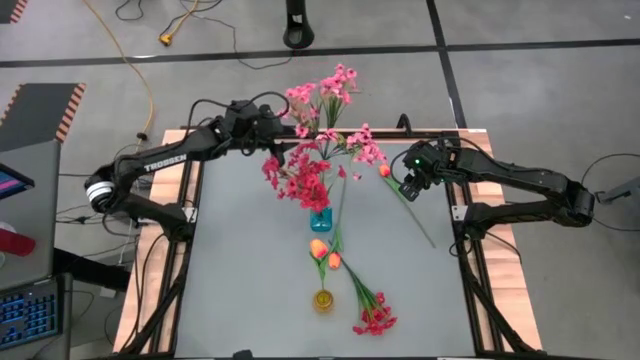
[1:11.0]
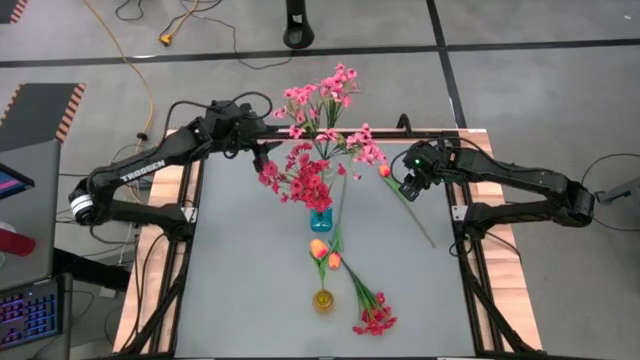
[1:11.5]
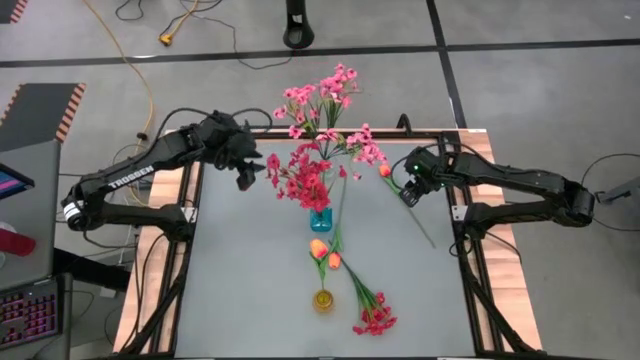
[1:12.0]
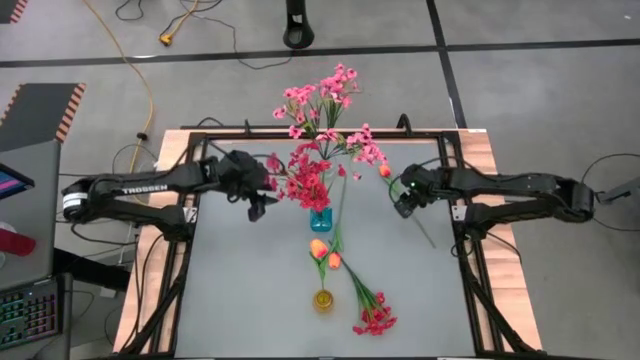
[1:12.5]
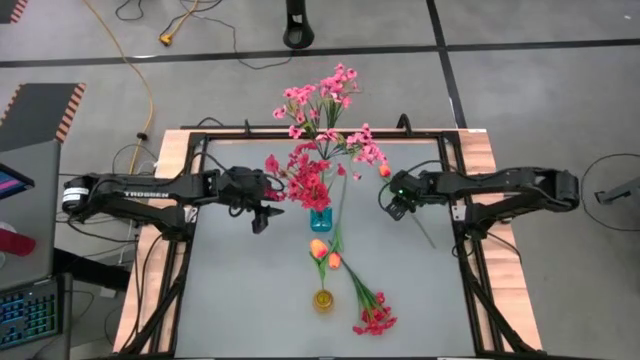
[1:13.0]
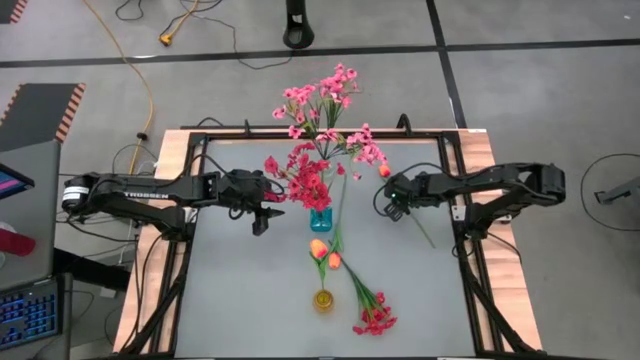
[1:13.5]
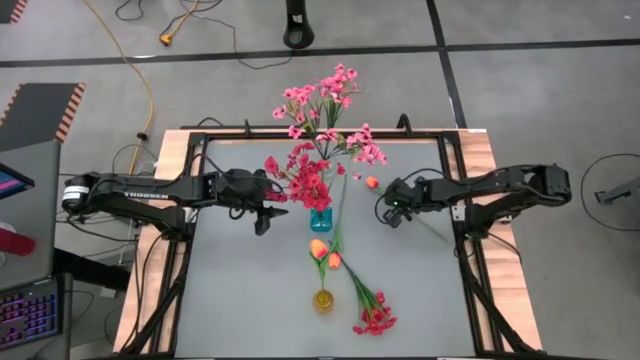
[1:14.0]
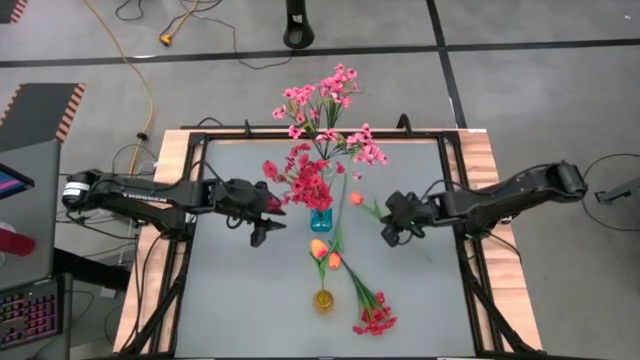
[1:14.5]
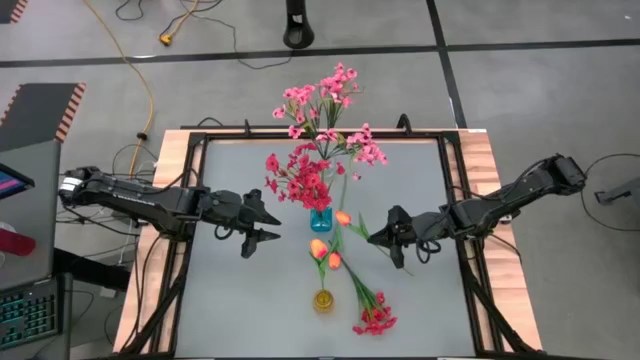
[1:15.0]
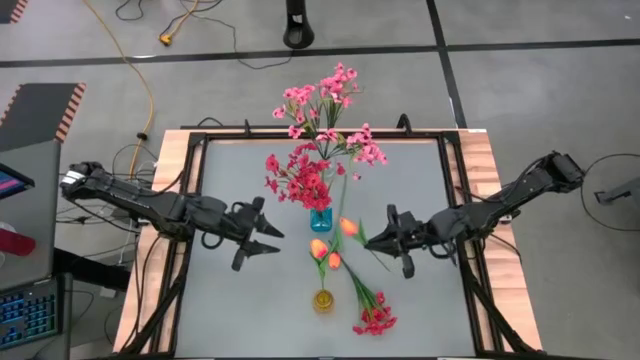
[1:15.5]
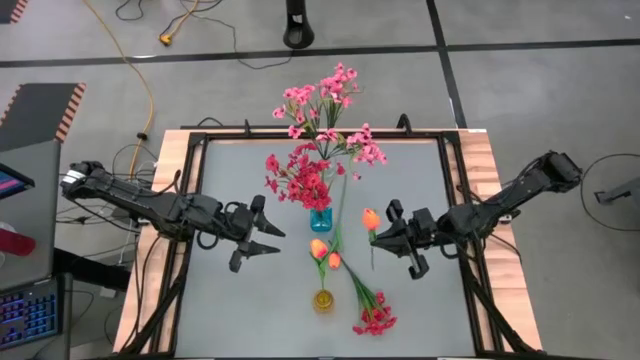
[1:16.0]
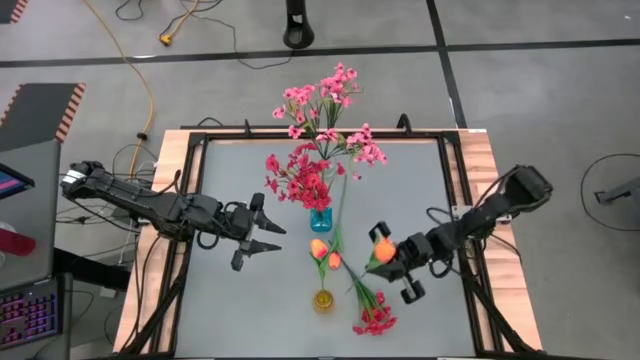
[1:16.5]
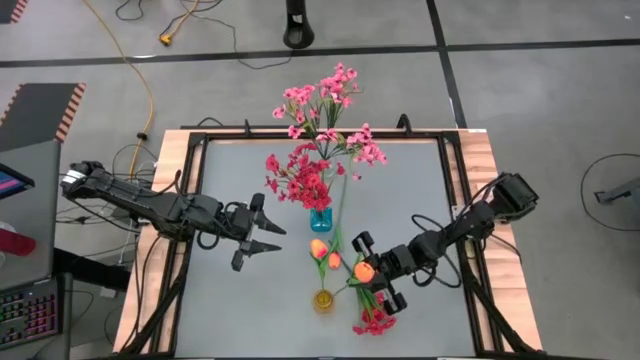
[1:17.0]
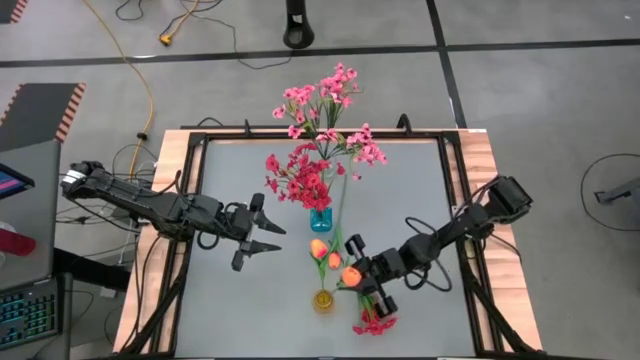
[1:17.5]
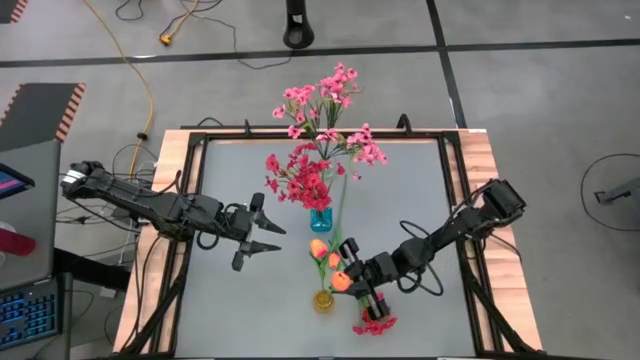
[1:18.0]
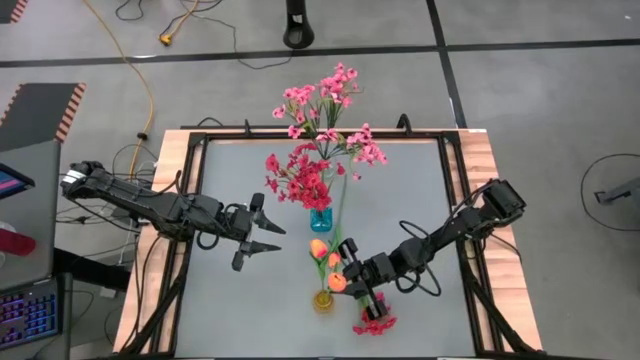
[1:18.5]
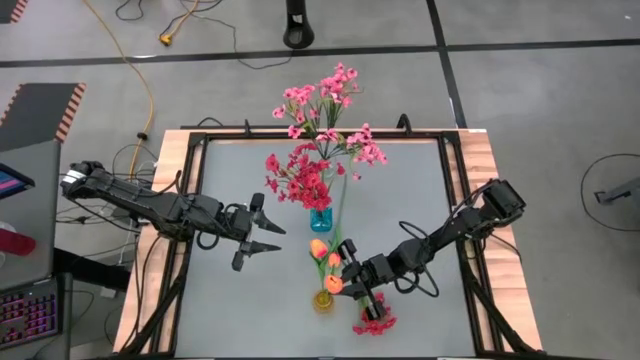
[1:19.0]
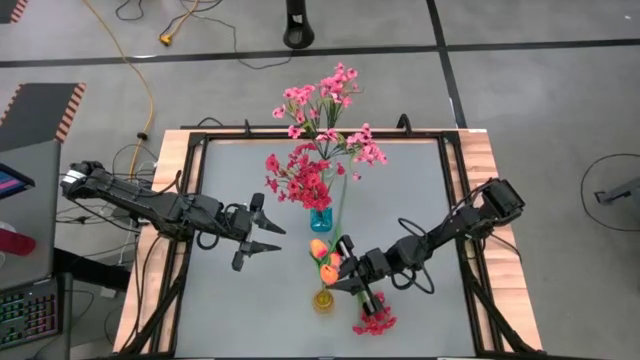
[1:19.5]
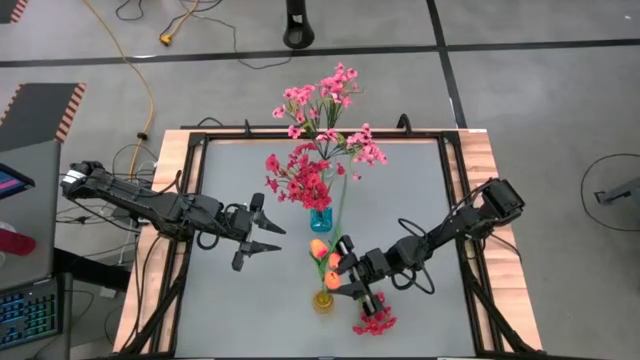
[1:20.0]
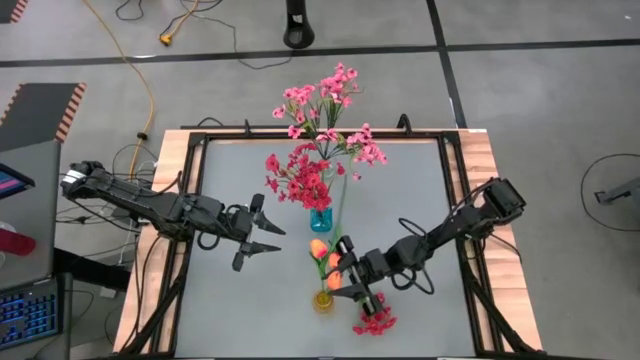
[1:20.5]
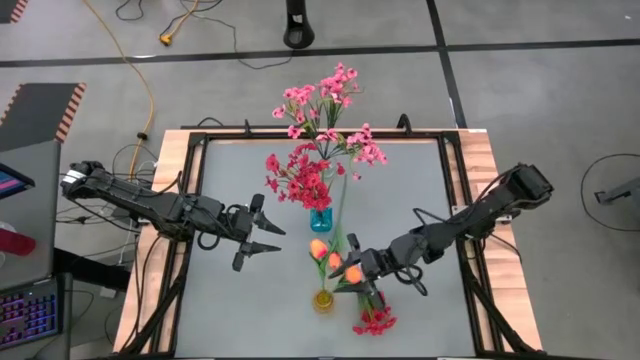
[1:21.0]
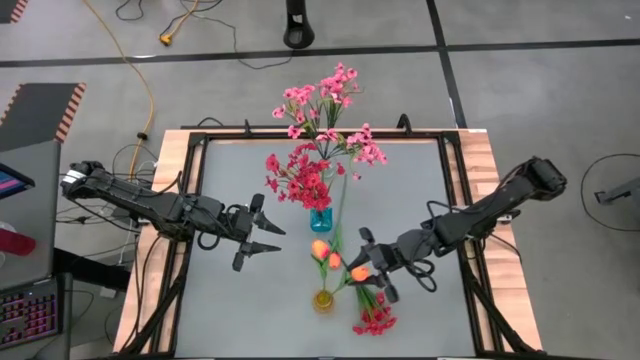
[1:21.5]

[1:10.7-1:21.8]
Task: Sort flowers into vase by color
Put the top orange flower into the yellow vase

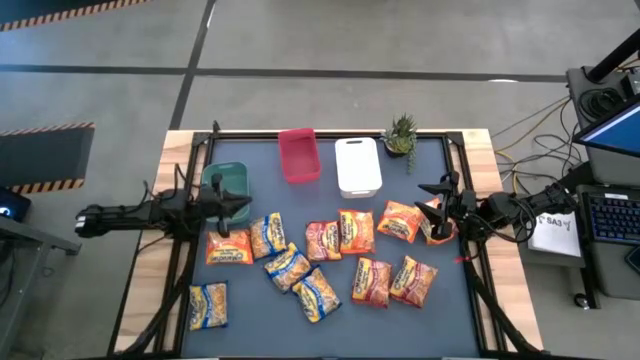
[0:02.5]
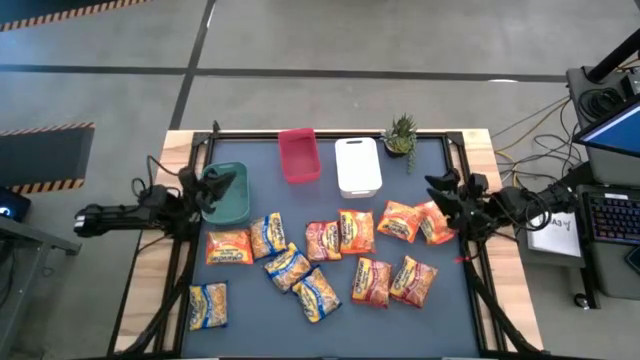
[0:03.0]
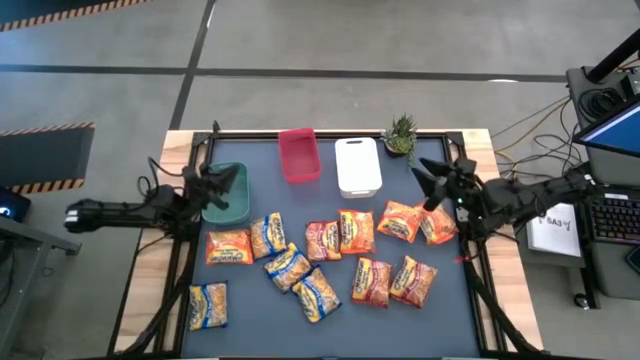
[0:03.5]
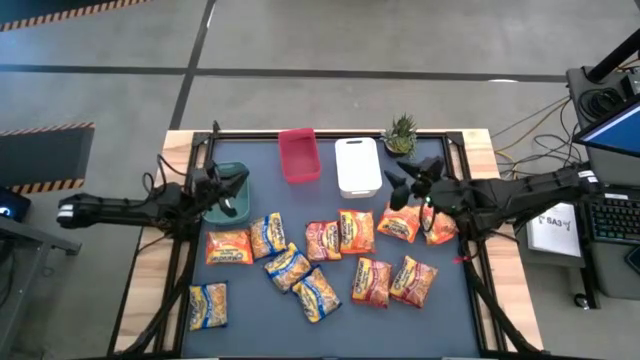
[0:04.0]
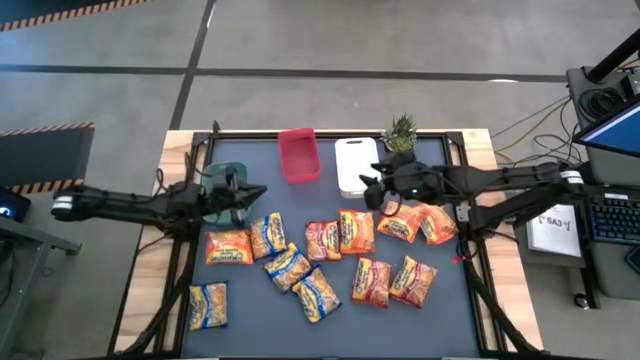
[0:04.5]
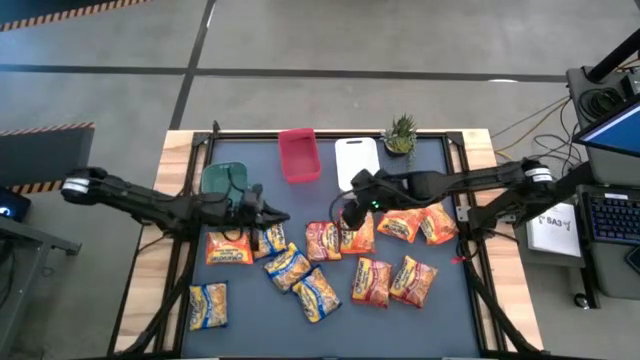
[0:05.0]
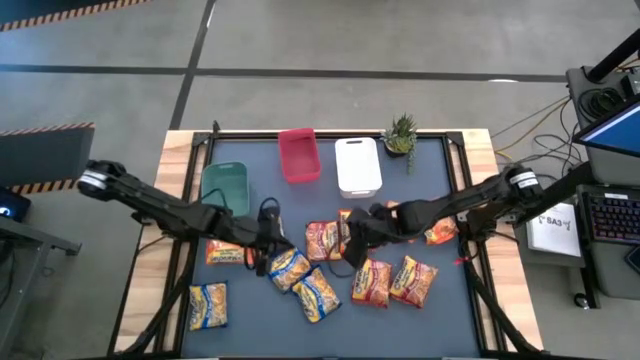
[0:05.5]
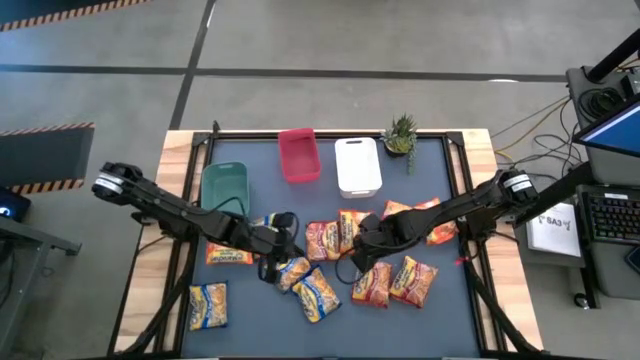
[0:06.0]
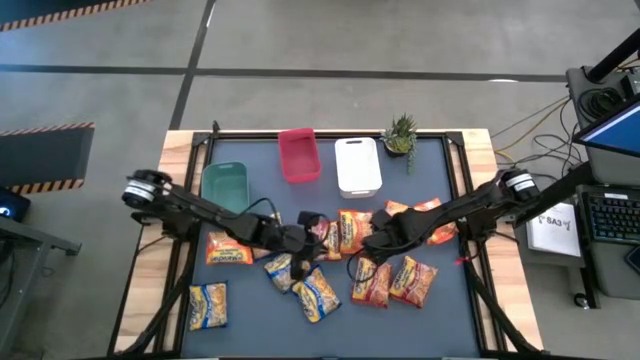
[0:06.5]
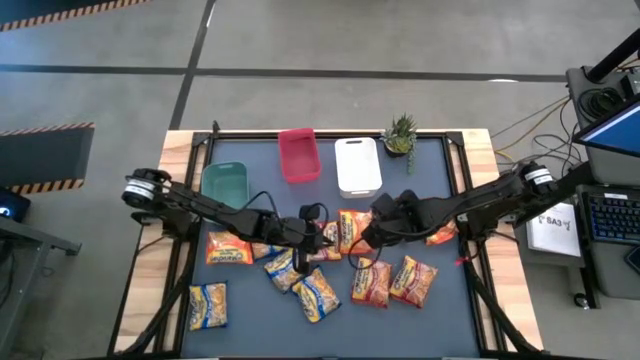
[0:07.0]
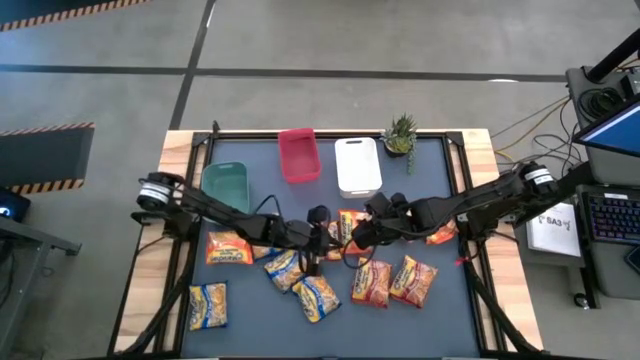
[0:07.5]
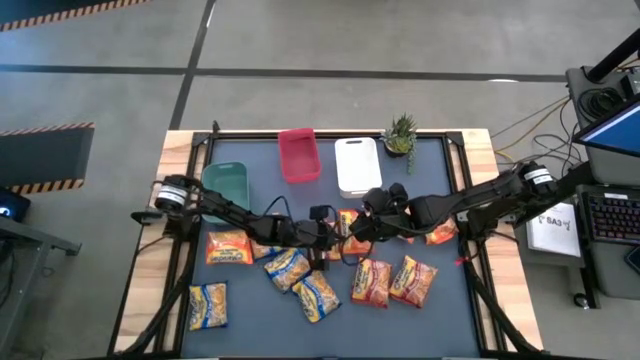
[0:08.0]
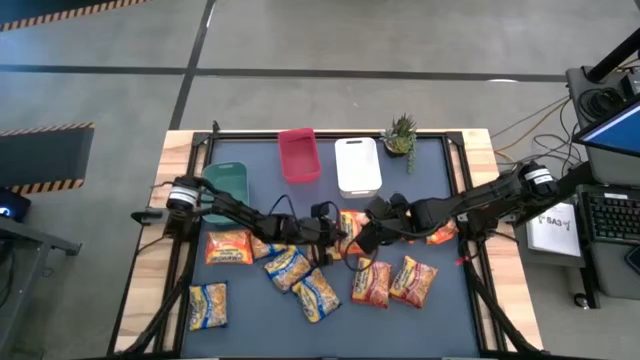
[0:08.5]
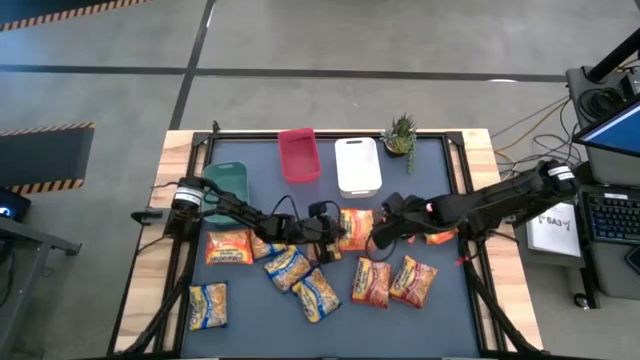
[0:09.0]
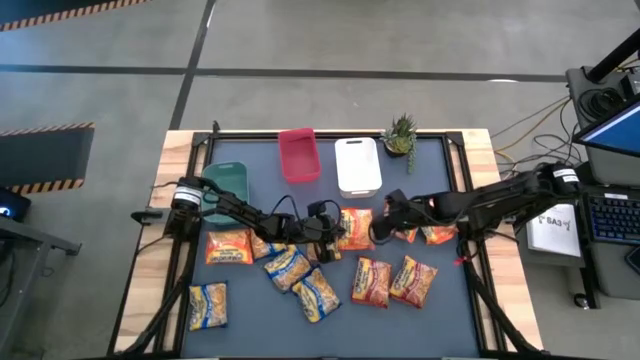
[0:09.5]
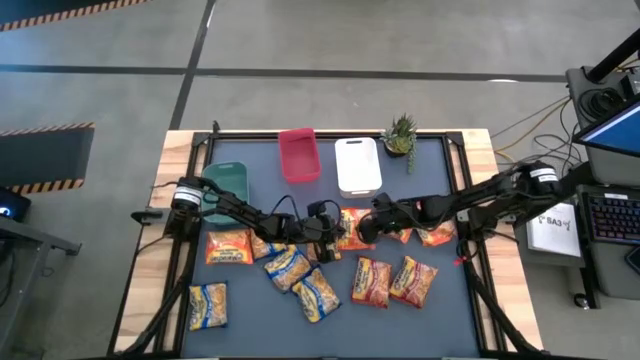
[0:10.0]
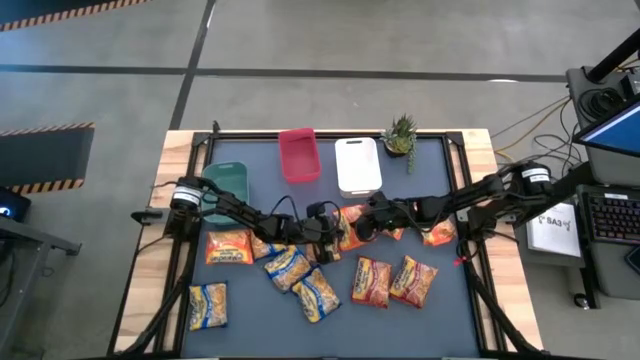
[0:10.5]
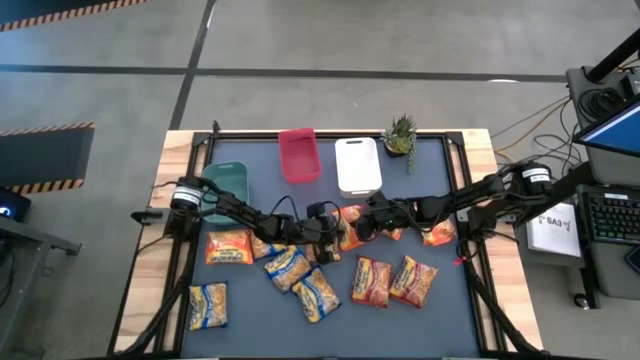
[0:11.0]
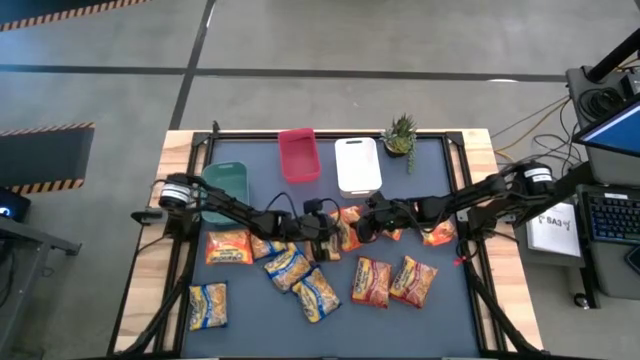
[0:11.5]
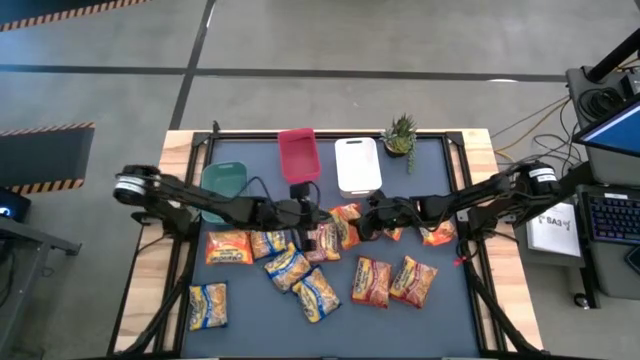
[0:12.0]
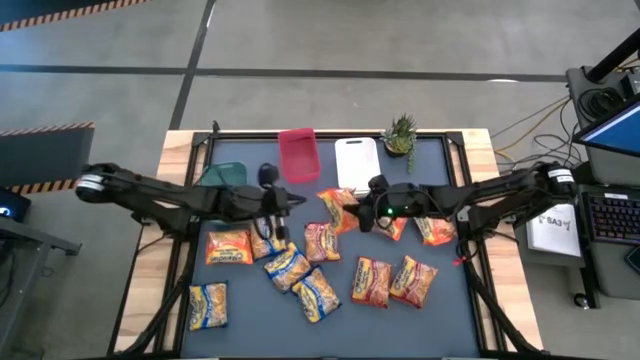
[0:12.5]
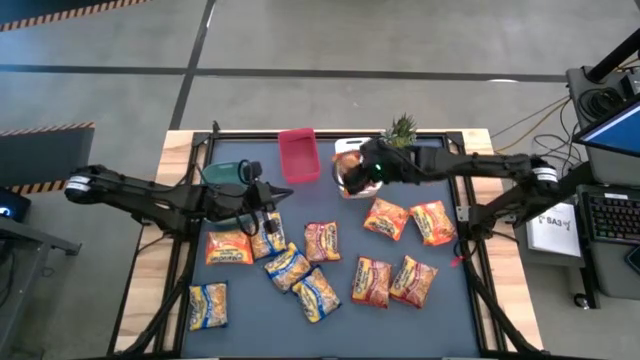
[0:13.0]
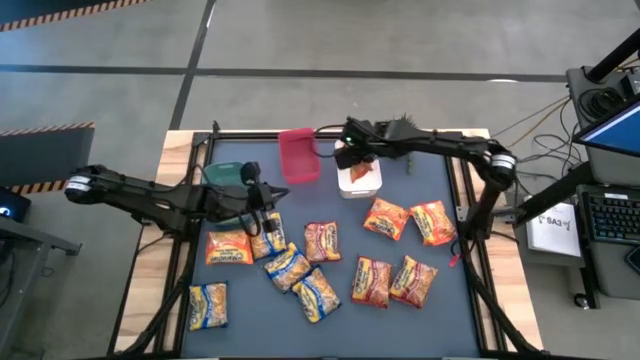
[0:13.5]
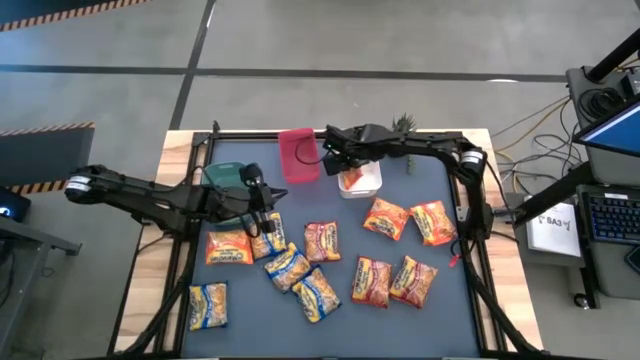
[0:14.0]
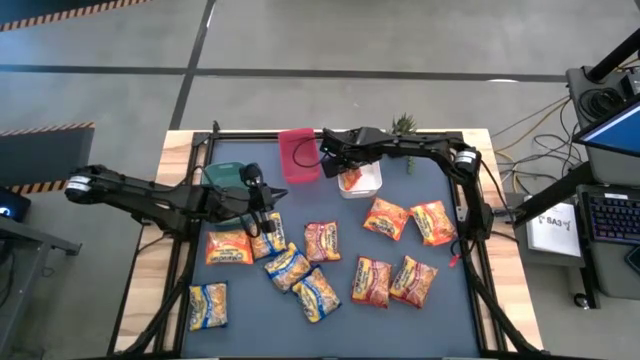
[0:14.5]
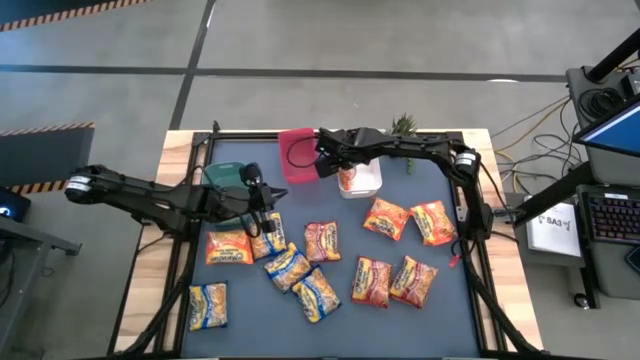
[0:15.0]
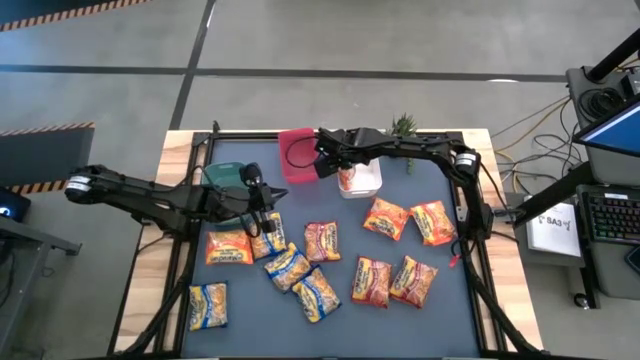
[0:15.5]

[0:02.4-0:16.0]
Task: Sort Maruchan noodles
Put the orange noodle pack into the white bin
